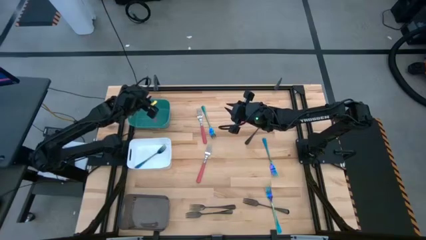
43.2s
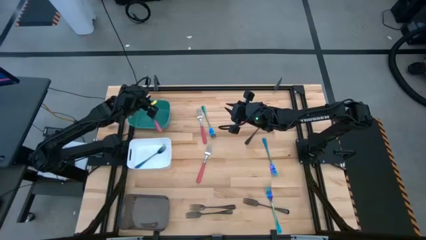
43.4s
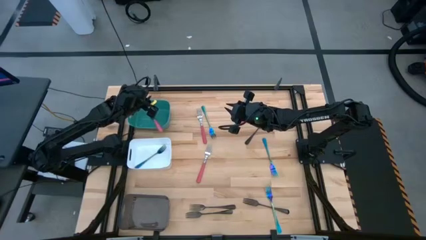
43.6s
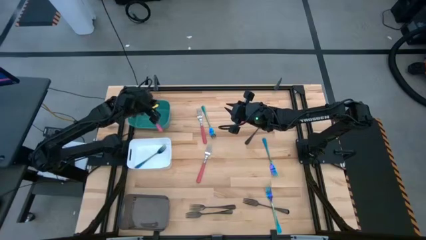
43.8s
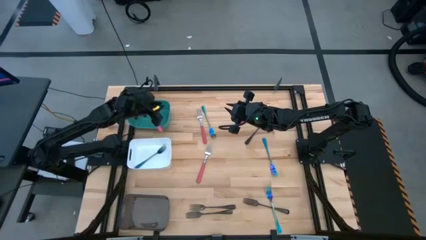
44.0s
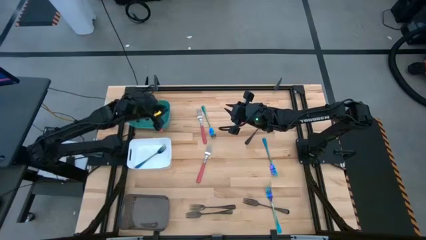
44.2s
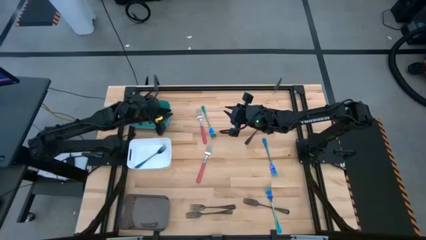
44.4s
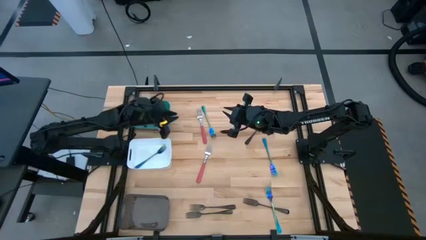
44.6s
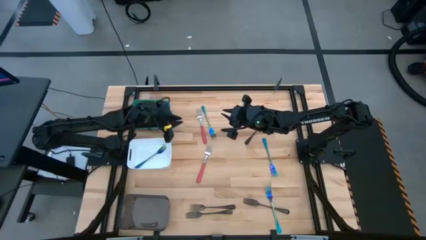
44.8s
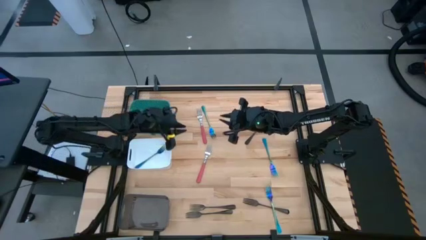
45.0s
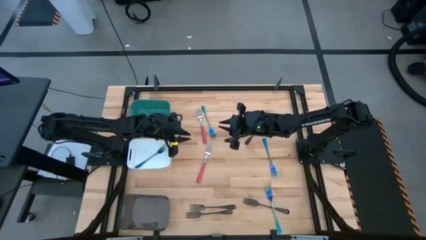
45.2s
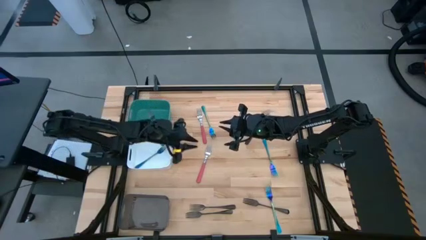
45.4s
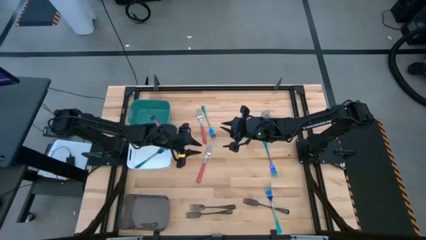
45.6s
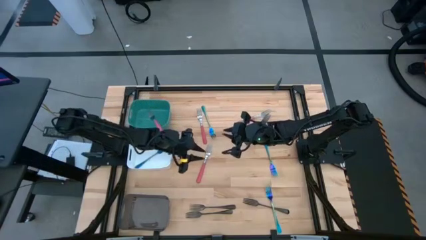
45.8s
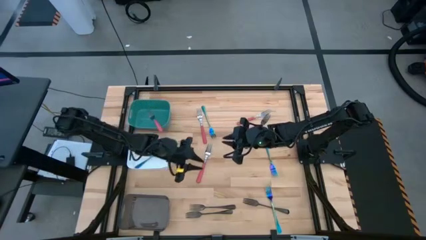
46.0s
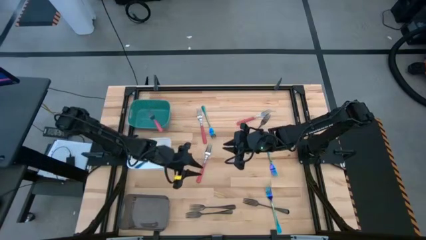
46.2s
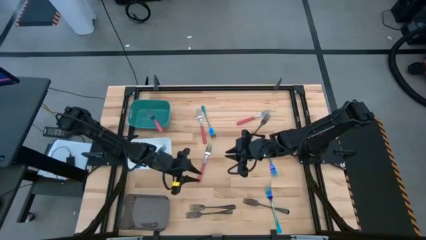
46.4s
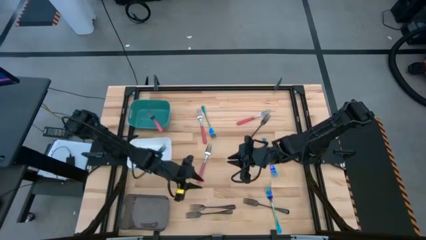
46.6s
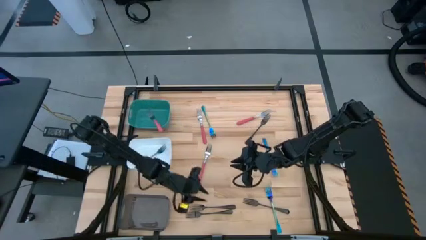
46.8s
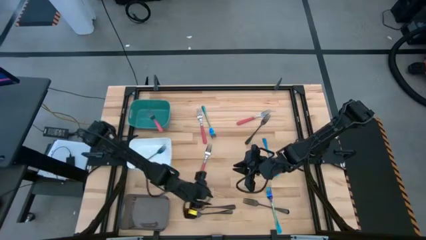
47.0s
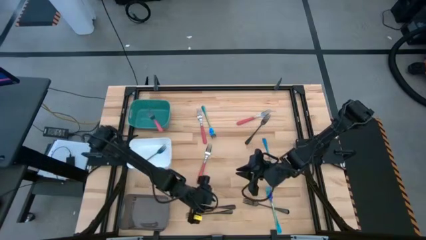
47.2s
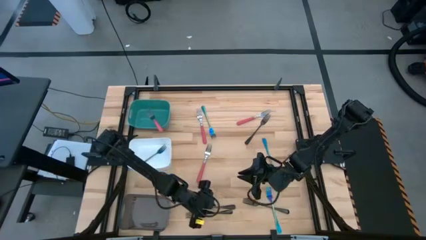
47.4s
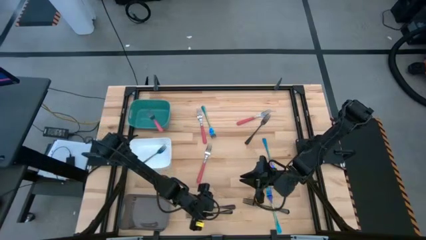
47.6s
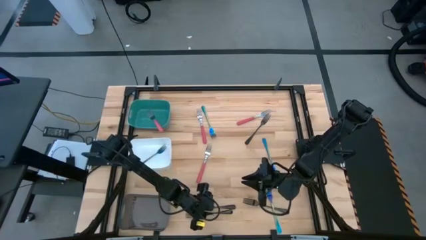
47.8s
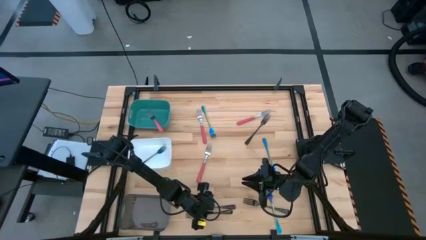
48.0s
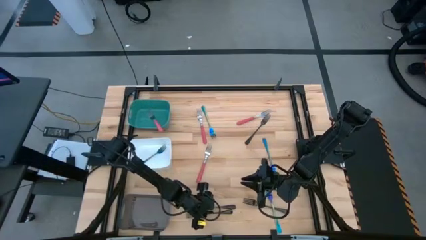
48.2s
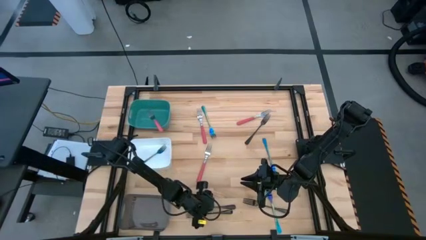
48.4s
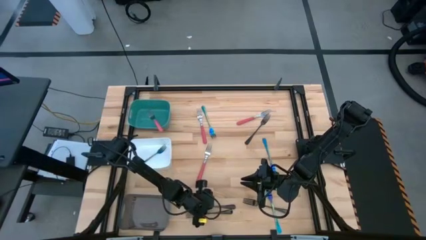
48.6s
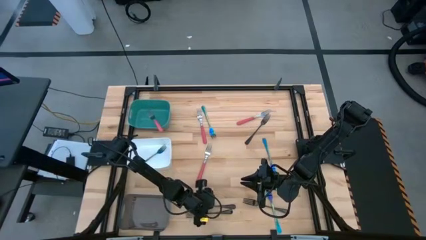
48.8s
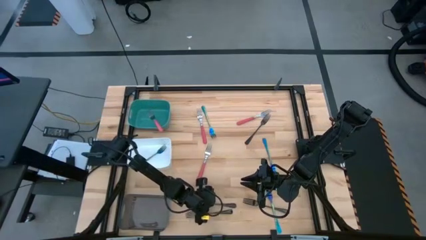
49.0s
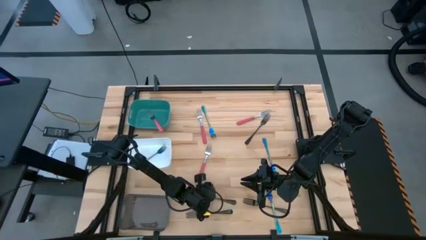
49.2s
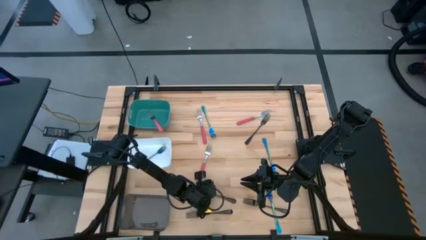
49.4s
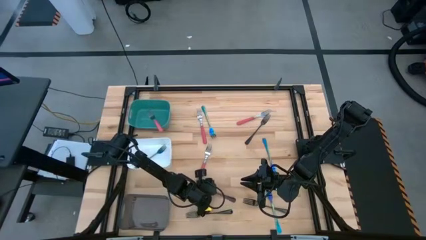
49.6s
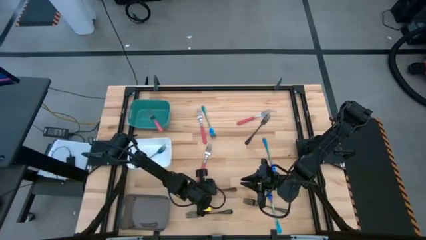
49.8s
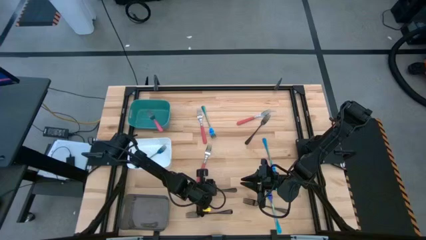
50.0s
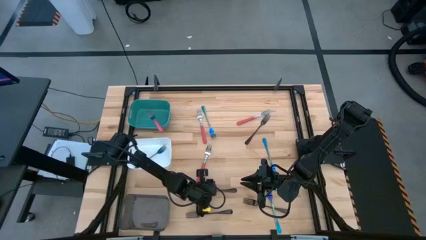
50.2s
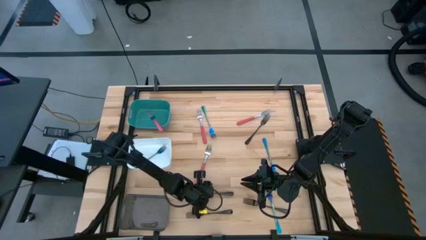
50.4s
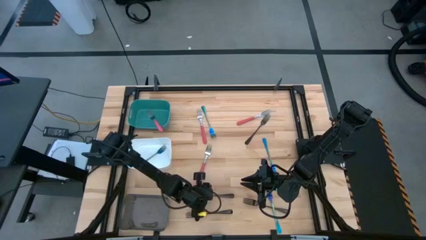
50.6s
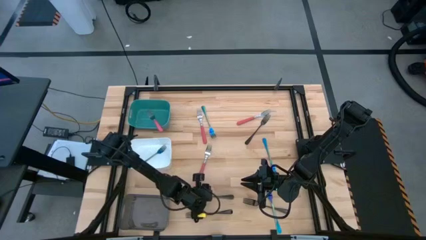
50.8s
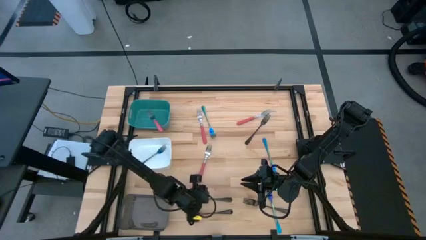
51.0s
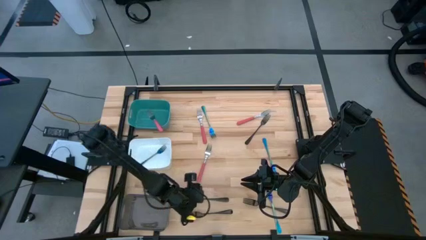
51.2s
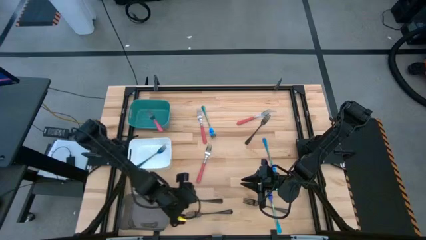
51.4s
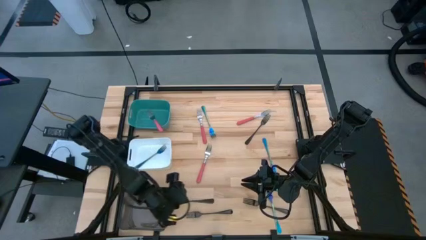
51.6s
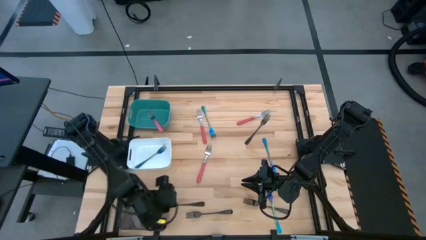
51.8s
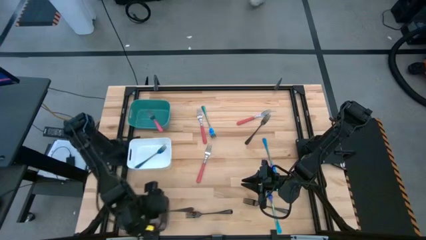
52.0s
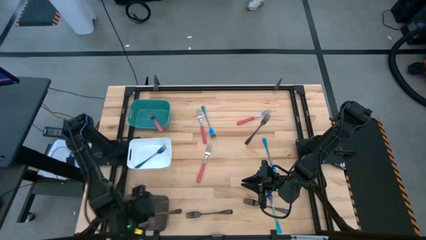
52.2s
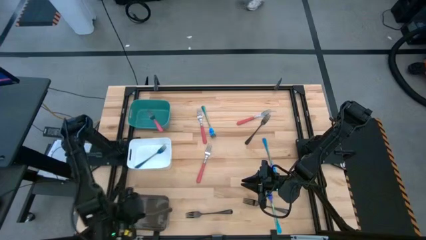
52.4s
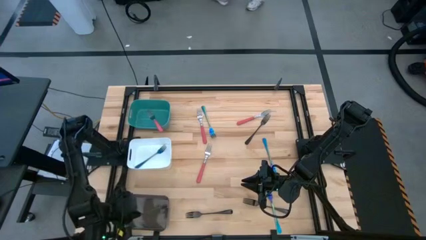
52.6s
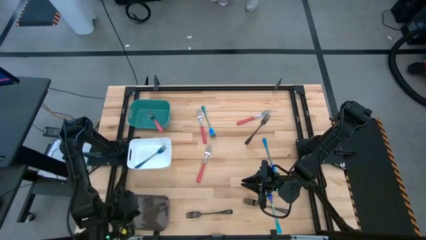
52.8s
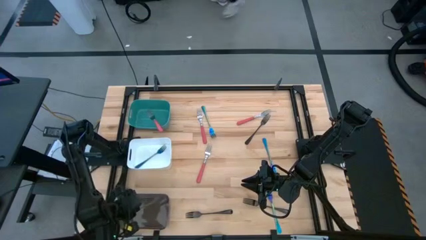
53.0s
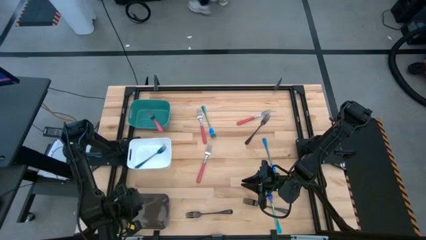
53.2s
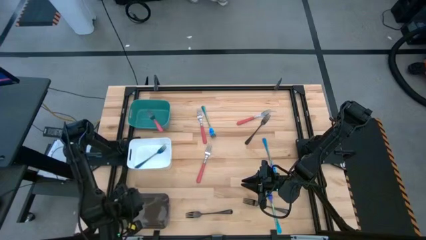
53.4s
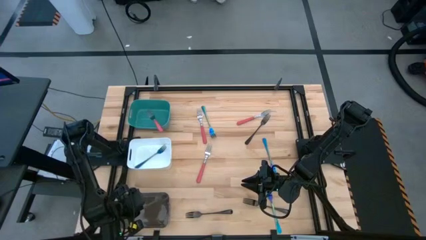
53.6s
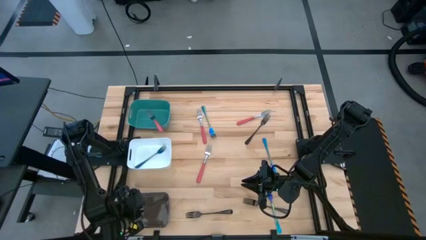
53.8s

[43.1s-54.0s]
Task: Sort silverware by color (type)
Put the black fork into the black bin

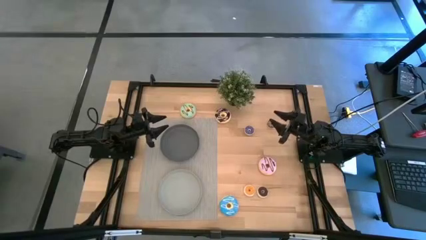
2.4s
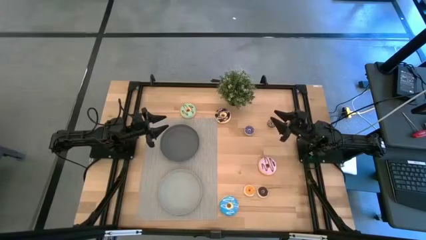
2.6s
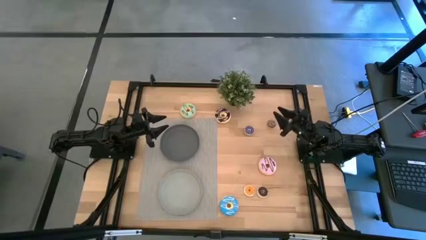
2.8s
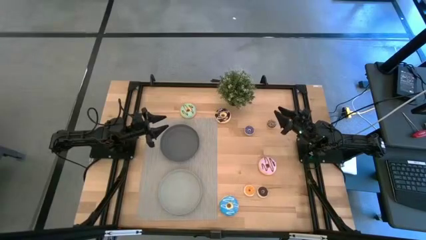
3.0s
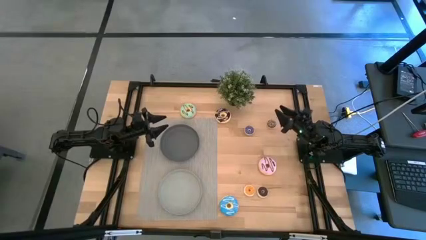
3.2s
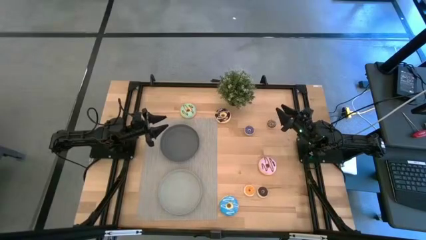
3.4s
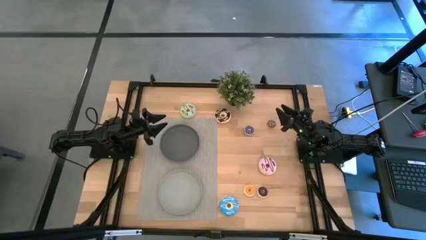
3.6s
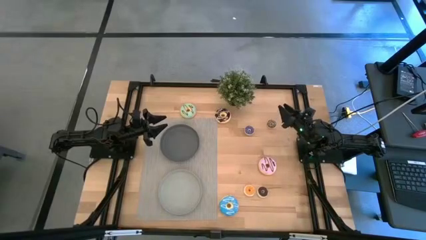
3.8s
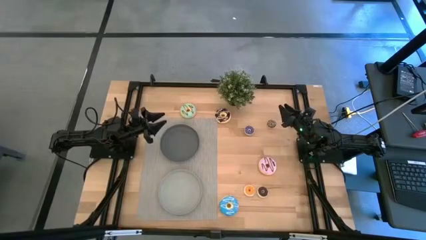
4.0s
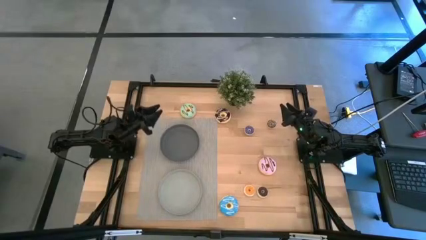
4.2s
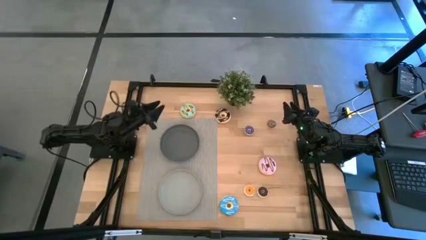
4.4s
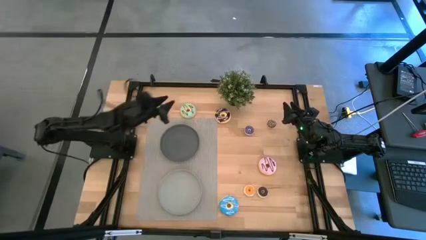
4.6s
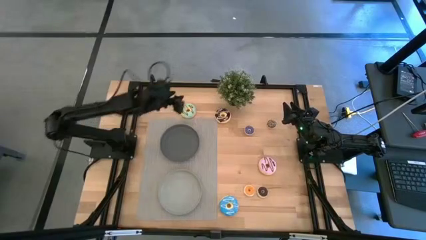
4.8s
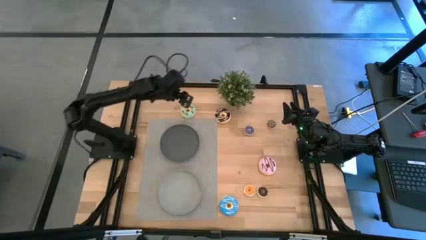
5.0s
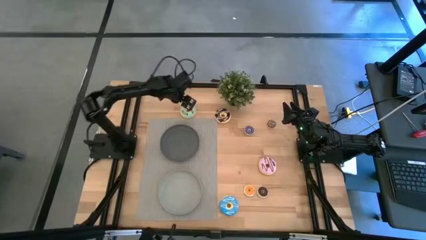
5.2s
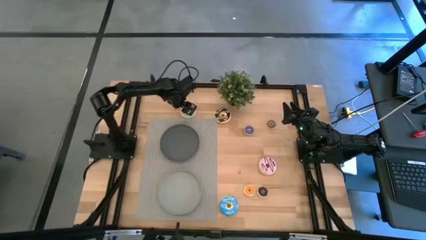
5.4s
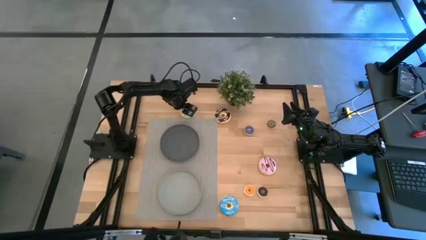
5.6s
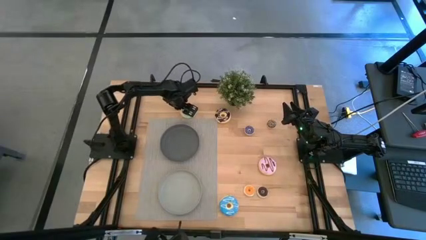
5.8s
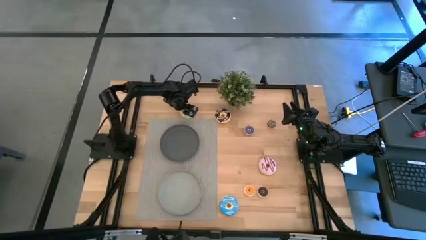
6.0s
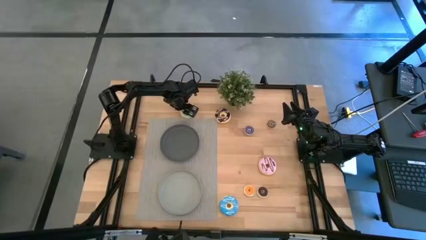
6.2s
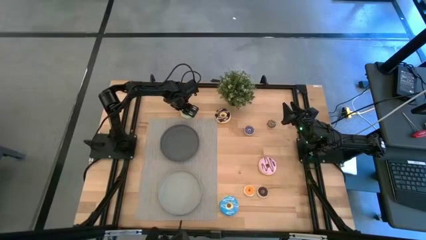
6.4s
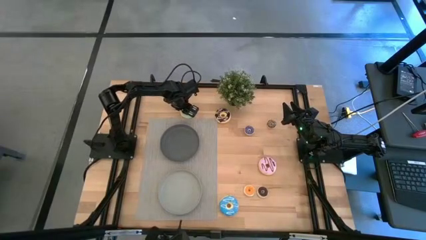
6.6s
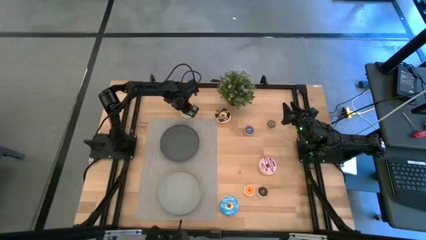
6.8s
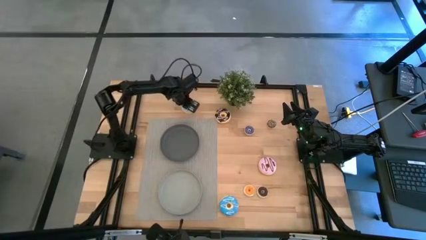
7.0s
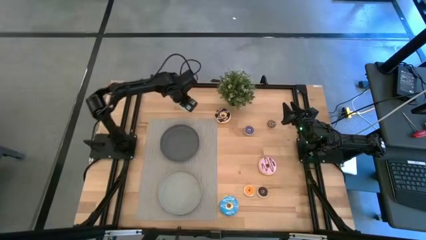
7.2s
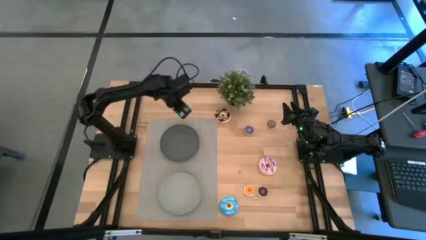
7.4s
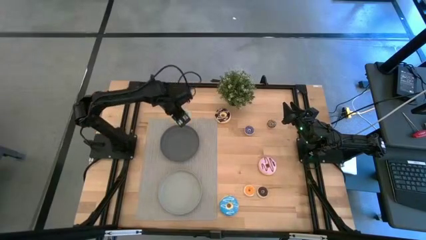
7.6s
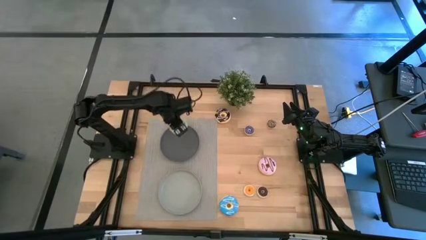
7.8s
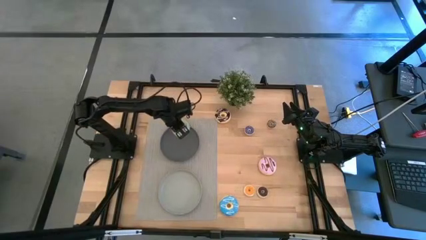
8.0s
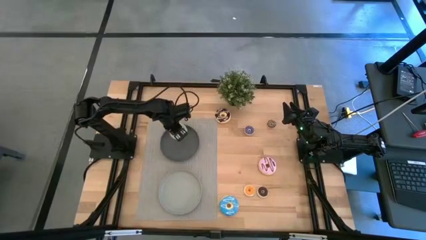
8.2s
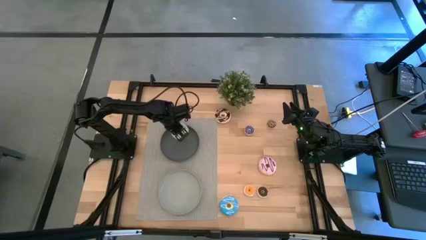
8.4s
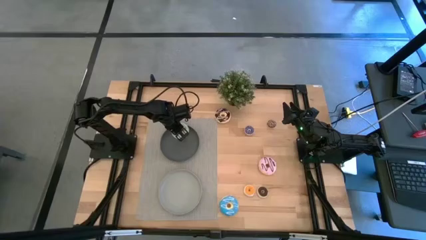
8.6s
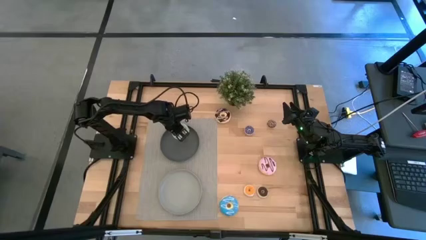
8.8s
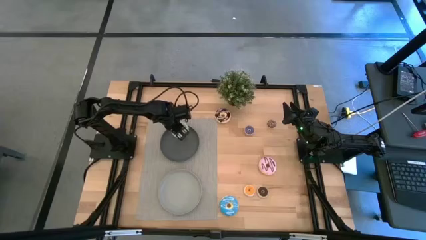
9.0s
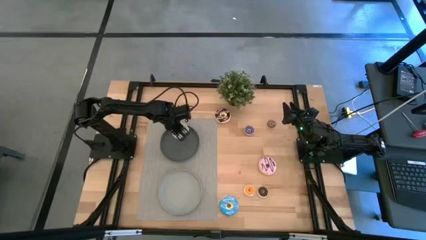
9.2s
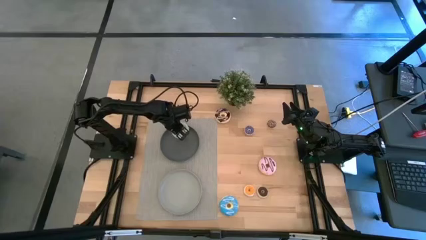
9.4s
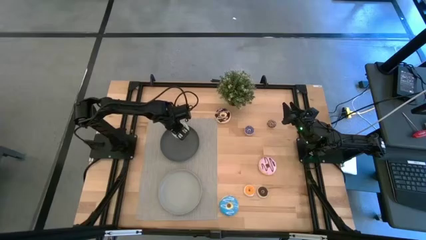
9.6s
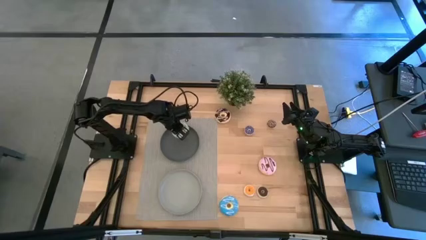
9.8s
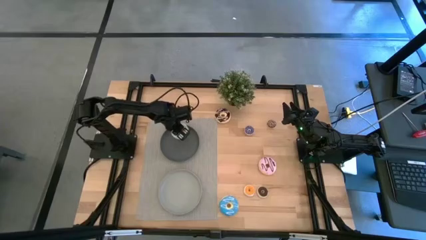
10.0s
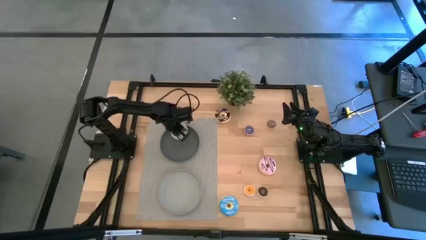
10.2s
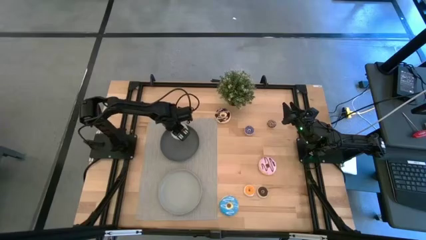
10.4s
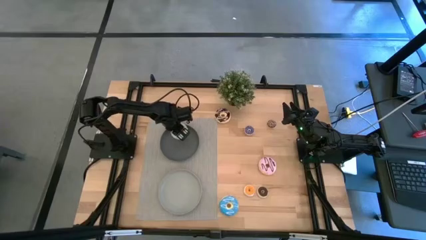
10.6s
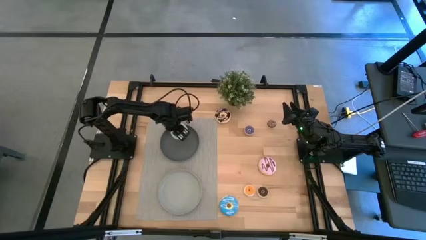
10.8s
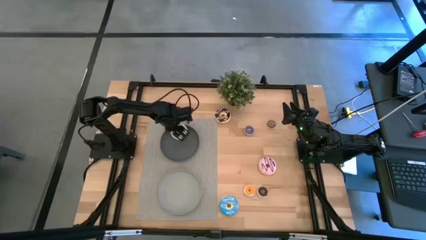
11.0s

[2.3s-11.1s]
Task: Pick & Place donuts
Put the big light blue donut on the black plate
